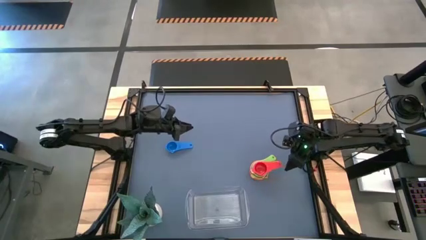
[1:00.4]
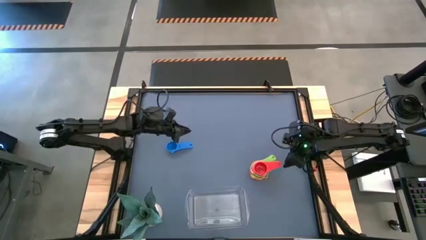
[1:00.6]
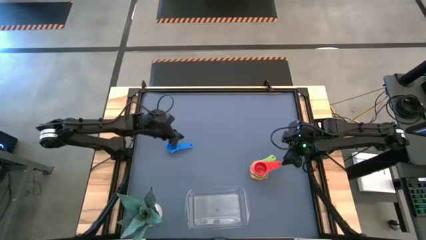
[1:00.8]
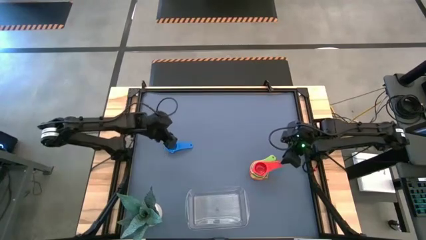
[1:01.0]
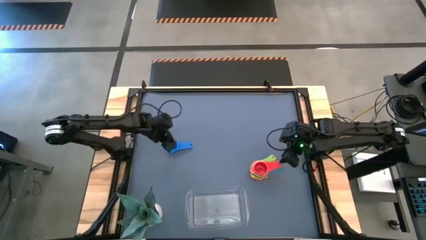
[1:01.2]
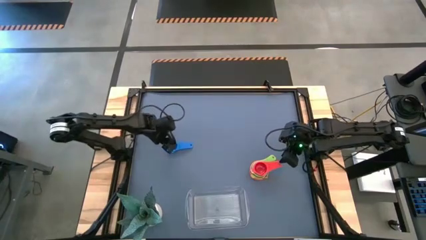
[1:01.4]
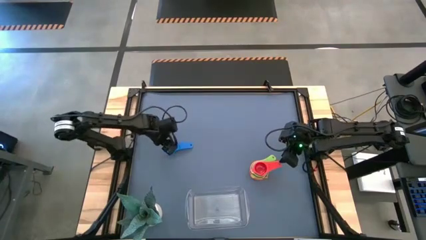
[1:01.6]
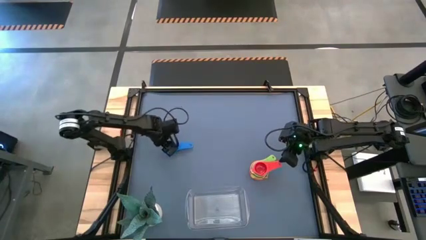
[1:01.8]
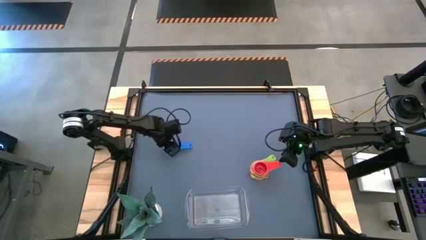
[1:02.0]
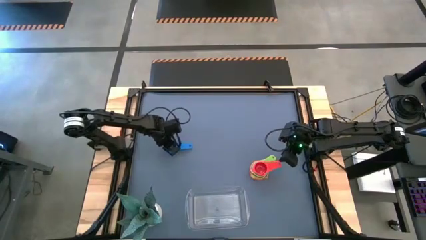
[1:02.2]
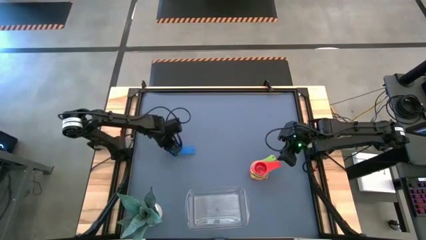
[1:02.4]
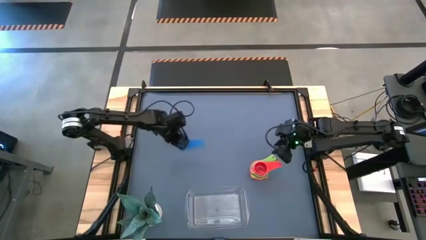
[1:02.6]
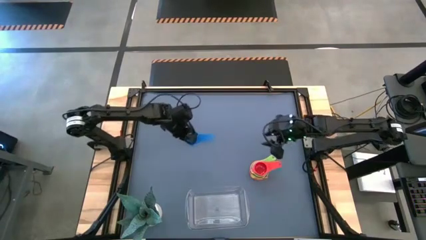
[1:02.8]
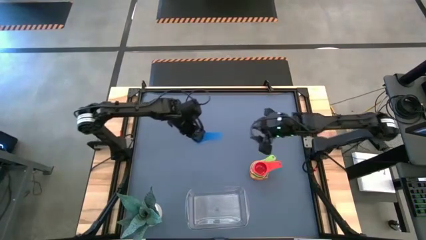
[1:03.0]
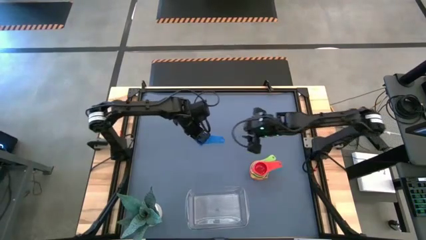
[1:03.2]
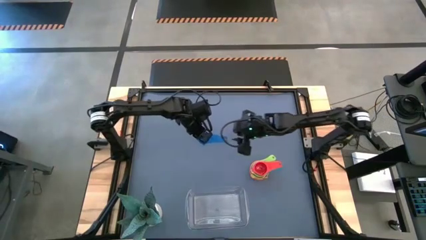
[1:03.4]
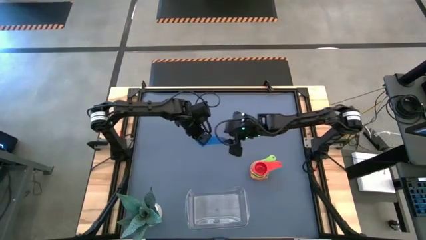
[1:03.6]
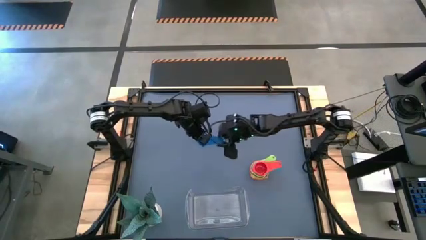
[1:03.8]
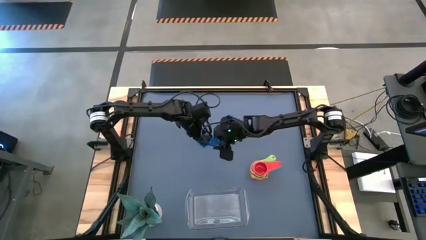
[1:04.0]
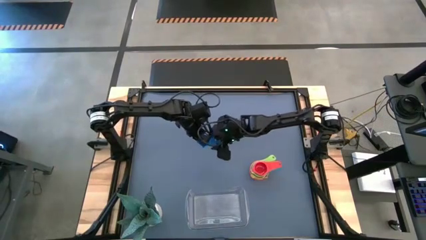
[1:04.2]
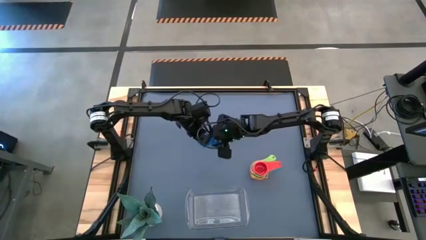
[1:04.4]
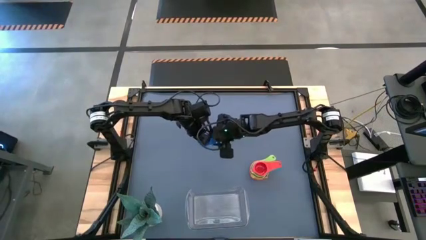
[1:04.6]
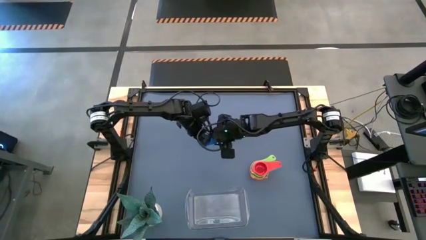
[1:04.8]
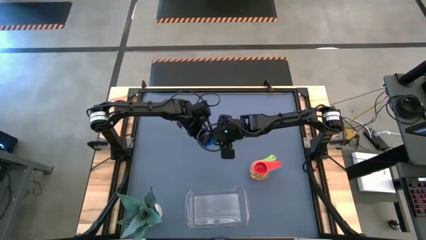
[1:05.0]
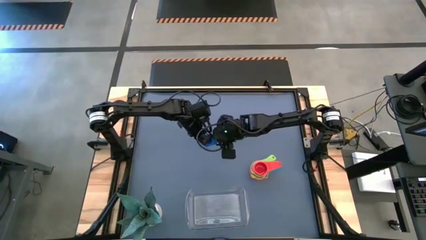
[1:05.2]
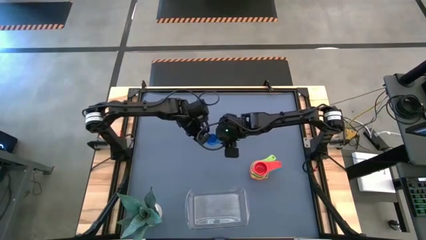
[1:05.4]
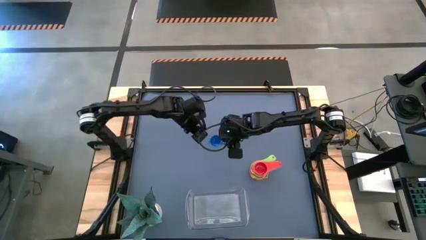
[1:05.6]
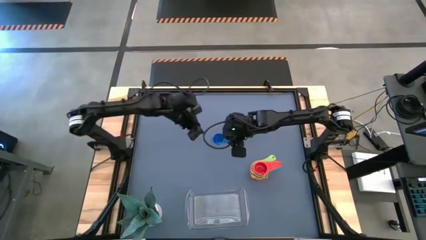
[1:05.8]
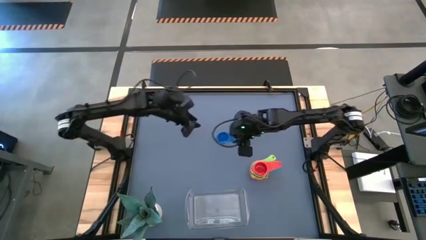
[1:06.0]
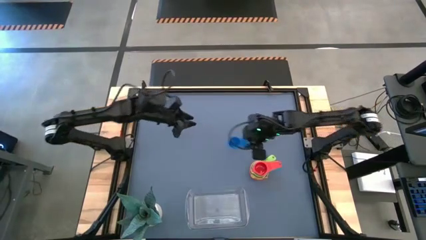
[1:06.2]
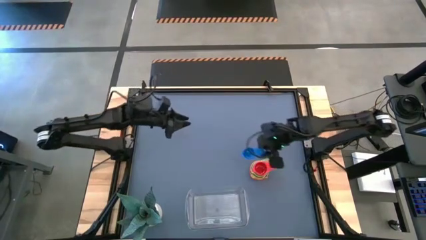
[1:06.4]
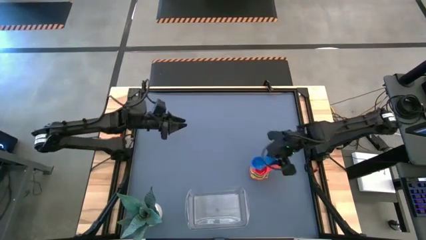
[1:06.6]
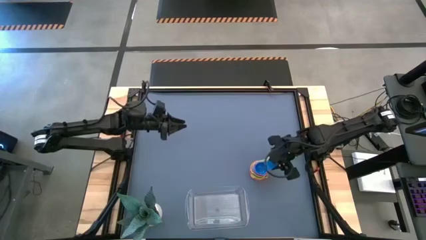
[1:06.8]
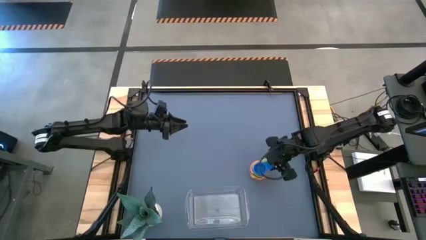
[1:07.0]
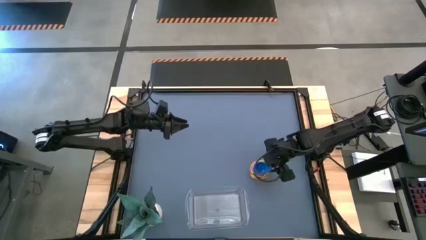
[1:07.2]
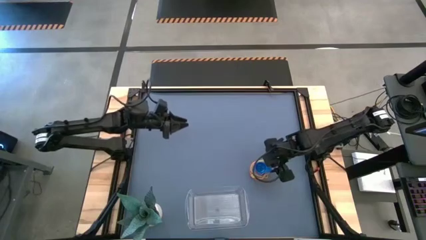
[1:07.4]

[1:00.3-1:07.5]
Task: Nest measuring cups in basket
Stack the blue measuring cup on top of the red measuring cup

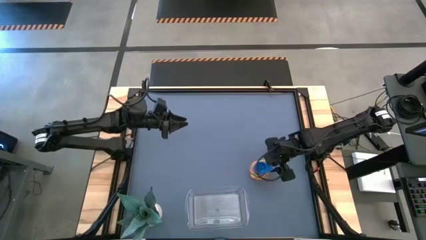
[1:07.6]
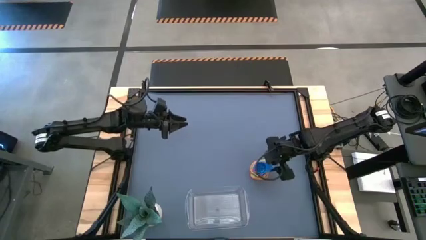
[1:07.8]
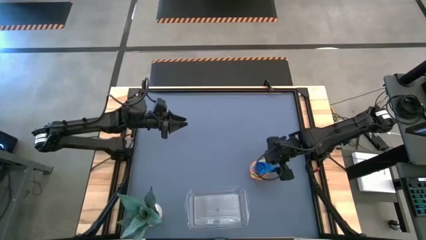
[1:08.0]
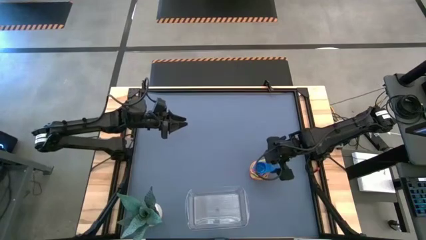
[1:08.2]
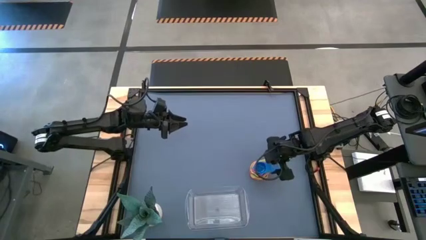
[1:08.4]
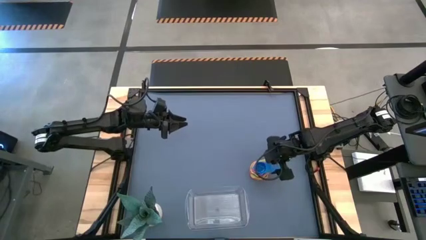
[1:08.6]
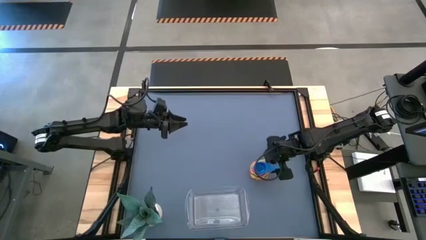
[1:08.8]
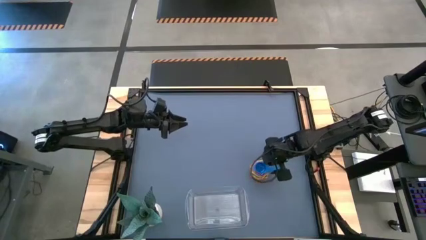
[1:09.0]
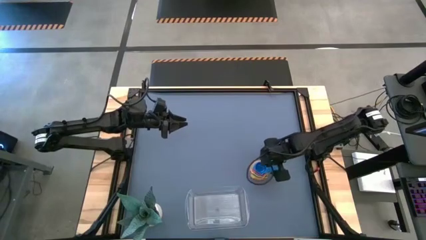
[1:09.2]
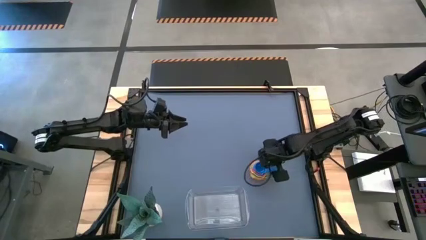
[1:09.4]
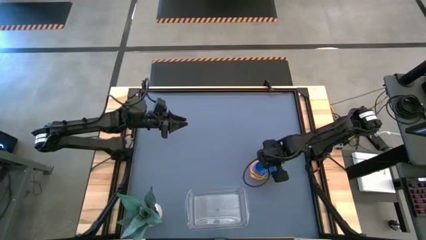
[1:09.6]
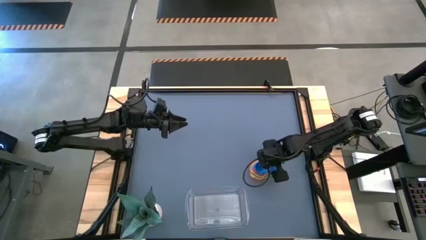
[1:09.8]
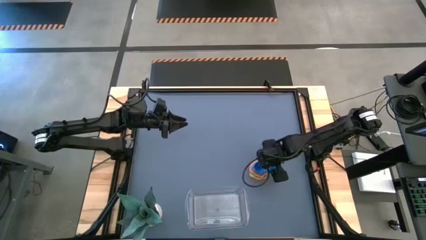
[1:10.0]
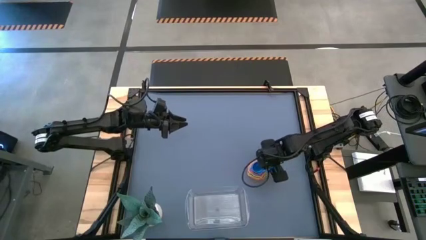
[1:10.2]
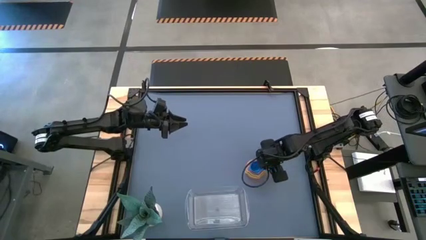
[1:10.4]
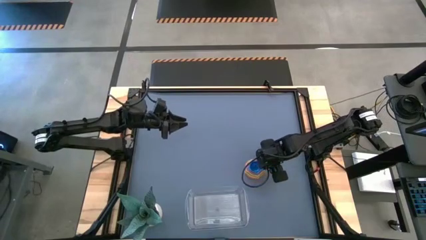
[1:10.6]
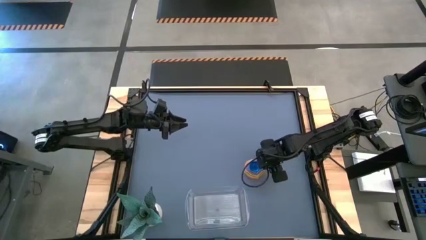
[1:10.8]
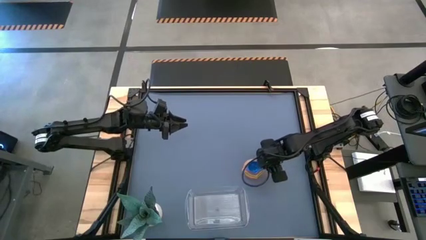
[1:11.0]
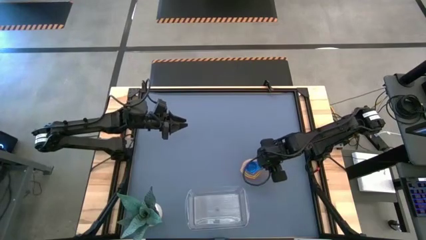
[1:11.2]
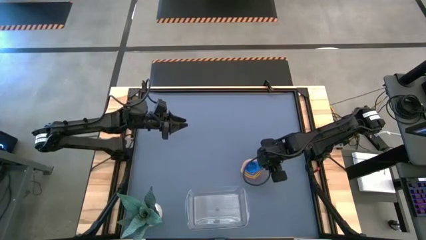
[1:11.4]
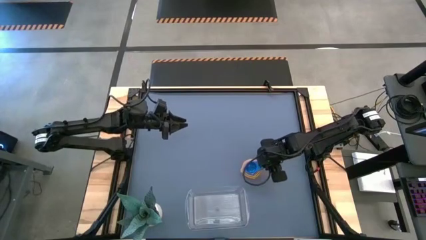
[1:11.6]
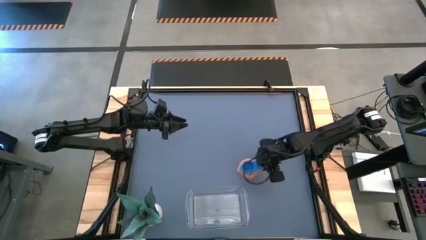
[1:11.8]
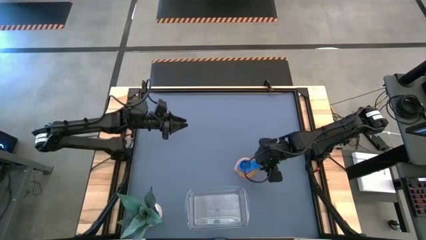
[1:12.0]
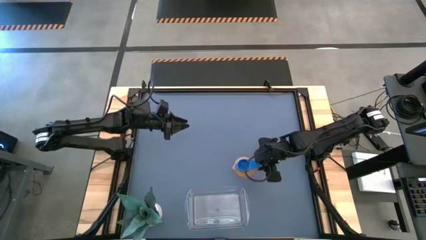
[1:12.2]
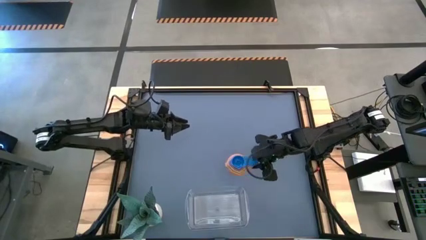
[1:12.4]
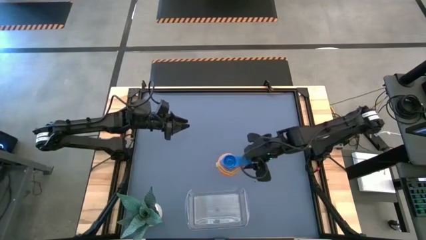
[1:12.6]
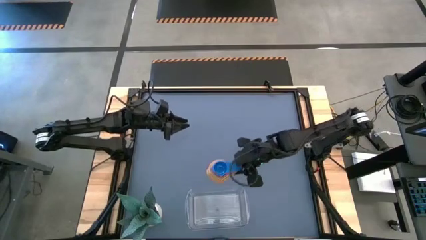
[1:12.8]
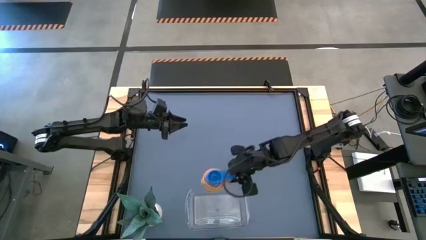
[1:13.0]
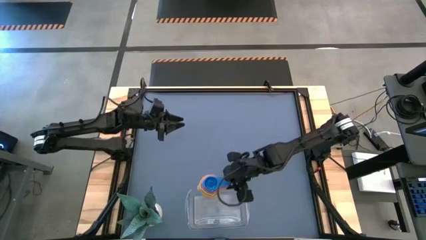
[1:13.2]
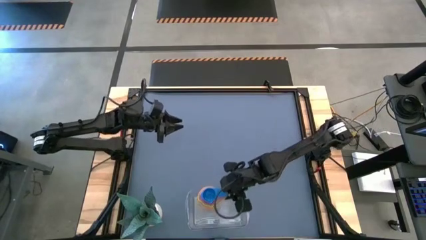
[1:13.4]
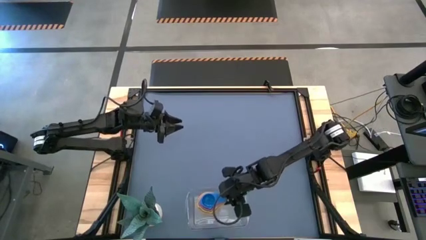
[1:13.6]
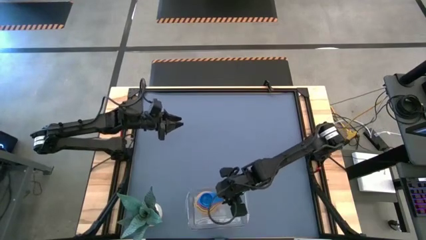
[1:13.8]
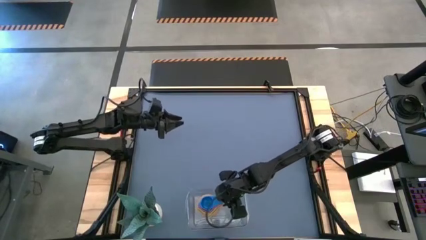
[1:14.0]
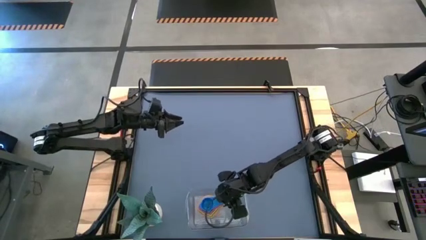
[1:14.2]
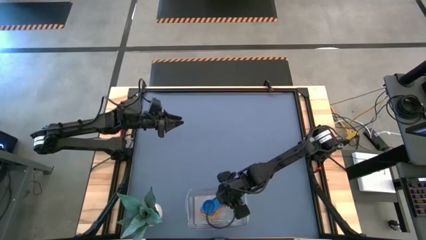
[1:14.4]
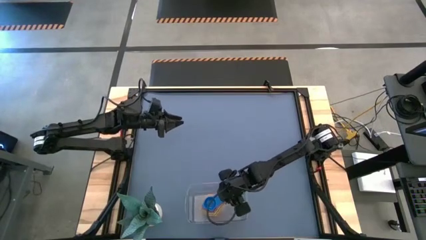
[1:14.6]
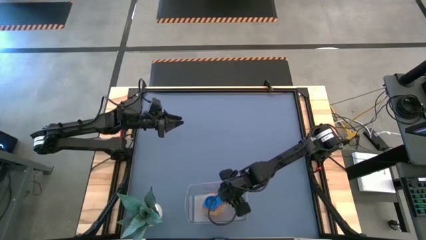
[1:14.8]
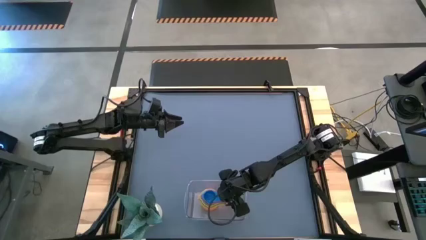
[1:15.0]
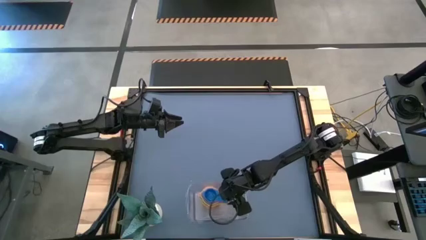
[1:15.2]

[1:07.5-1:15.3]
Put the stacked measuring cups into the transparent bin
